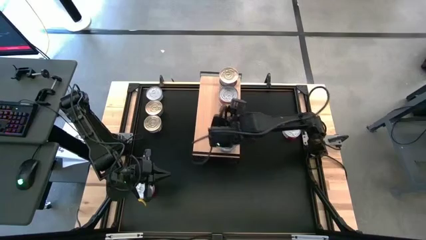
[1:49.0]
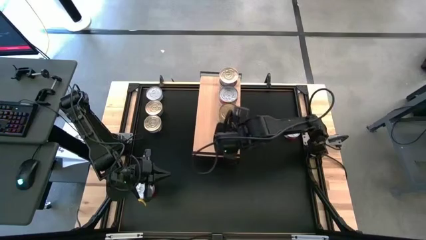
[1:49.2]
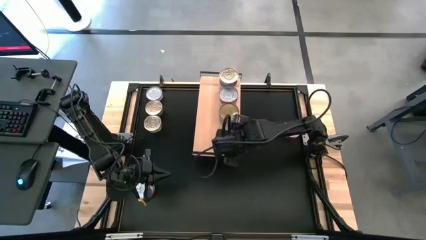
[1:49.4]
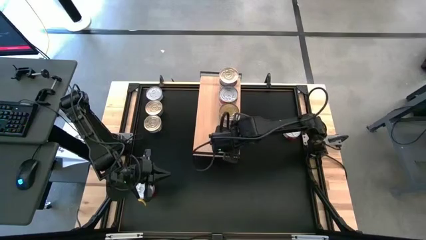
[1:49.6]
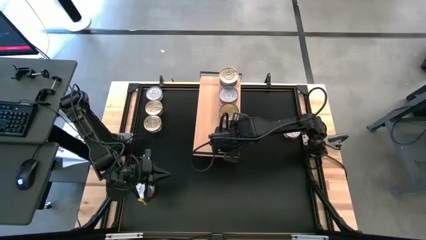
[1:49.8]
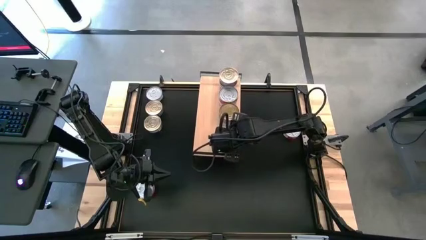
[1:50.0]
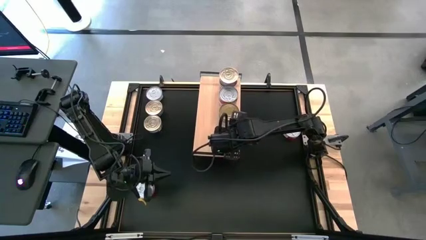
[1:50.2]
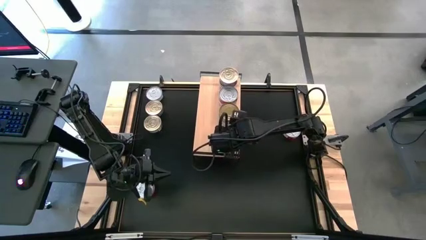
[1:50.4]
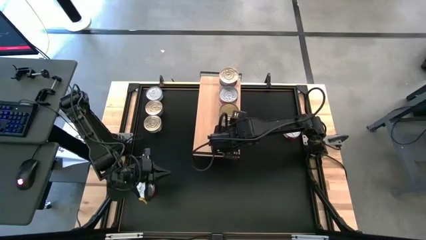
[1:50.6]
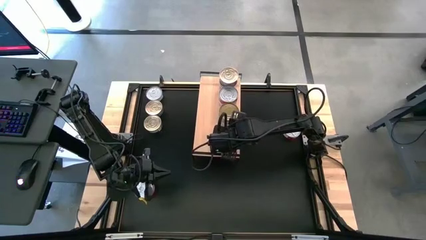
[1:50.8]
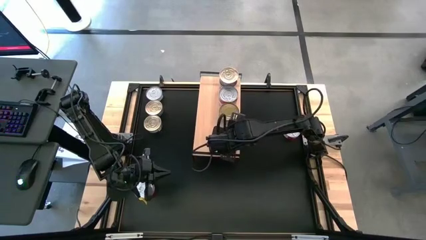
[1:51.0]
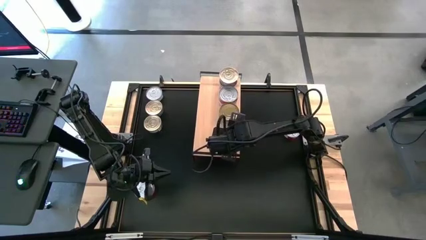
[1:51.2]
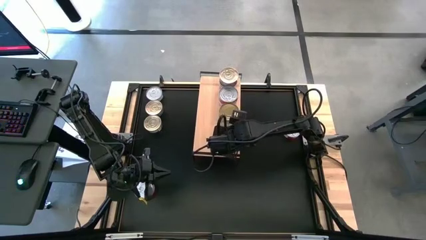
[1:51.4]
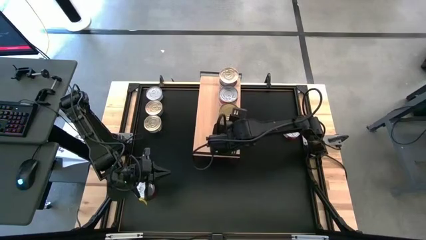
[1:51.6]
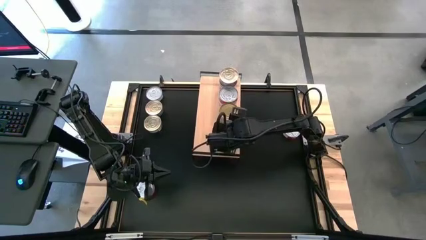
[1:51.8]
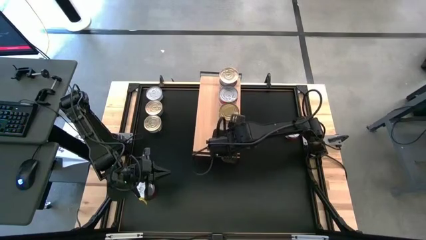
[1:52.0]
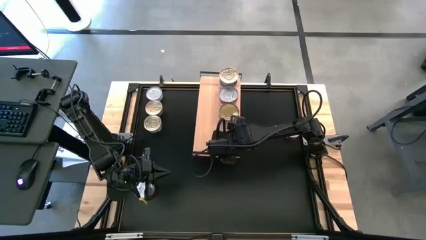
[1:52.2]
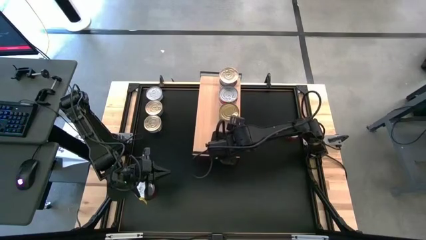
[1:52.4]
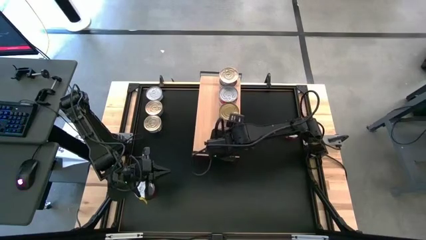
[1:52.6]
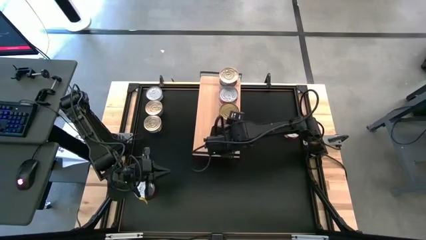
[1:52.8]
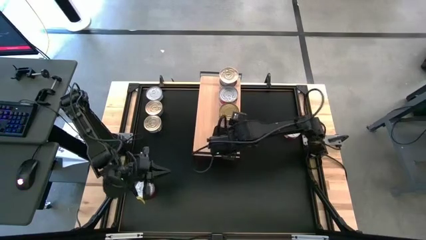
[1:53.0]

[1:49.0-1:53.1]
Task: Stack canned seafood by type on shelf
Adjust the dark green tuna can on the shelf

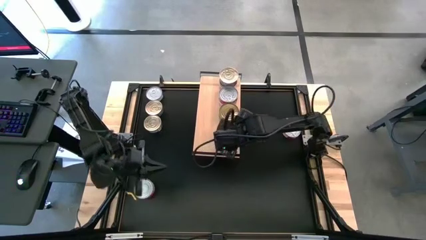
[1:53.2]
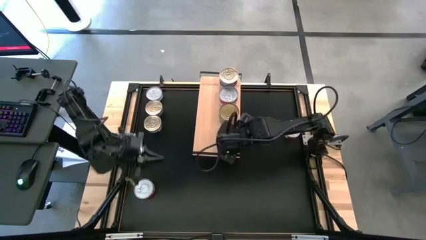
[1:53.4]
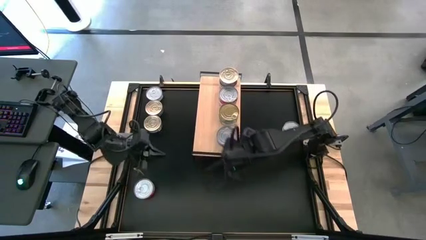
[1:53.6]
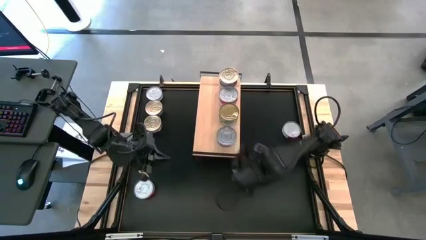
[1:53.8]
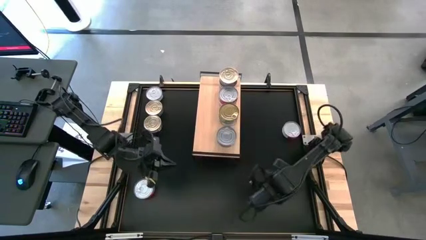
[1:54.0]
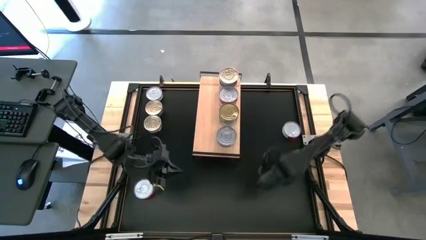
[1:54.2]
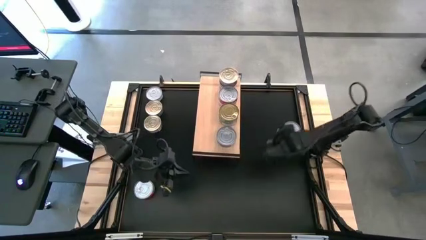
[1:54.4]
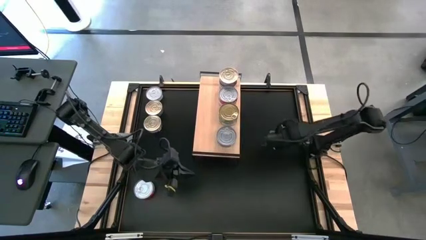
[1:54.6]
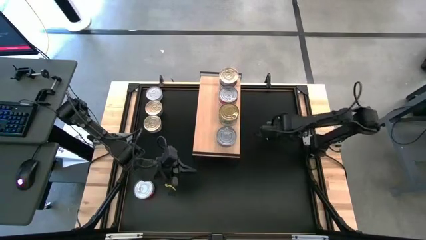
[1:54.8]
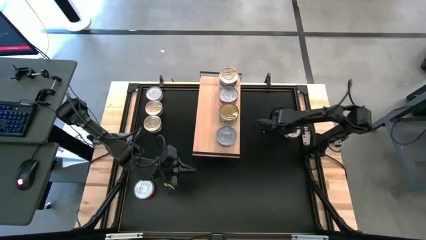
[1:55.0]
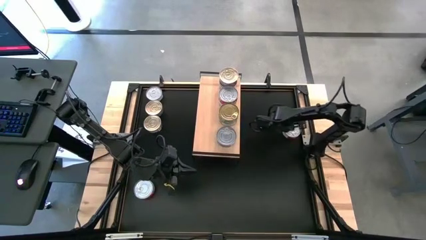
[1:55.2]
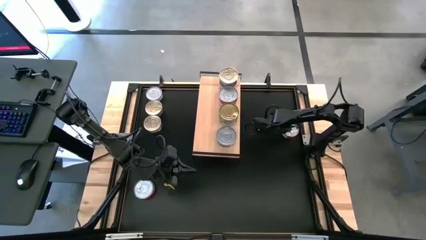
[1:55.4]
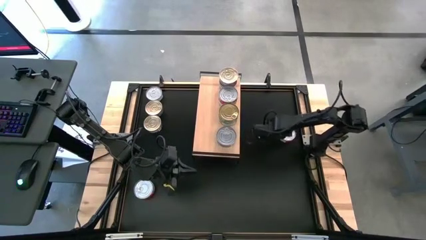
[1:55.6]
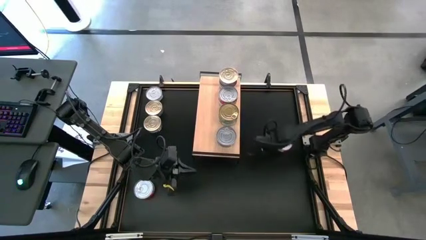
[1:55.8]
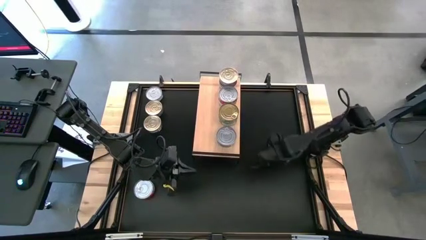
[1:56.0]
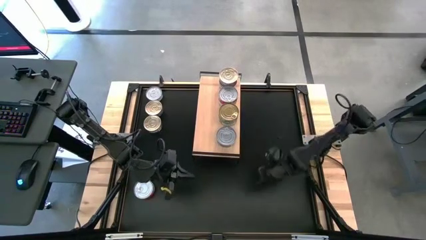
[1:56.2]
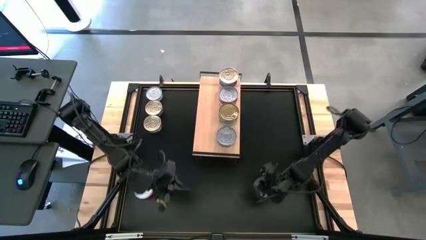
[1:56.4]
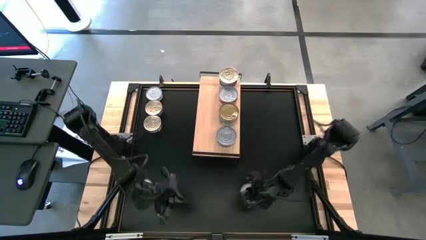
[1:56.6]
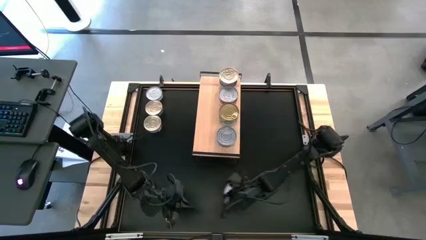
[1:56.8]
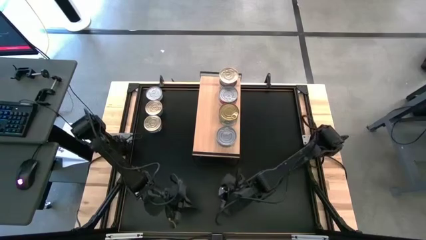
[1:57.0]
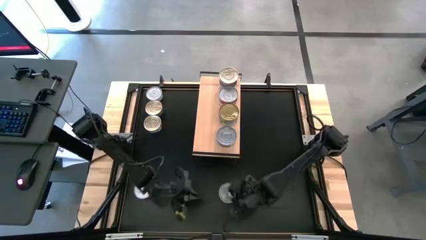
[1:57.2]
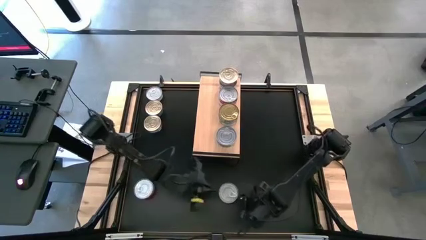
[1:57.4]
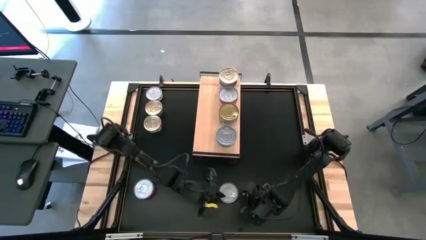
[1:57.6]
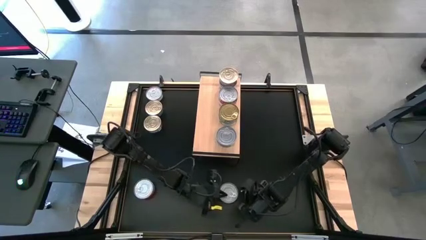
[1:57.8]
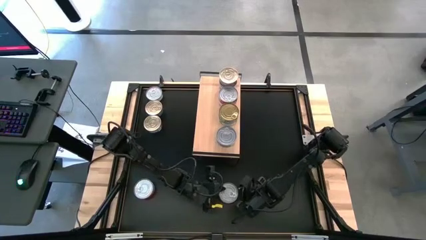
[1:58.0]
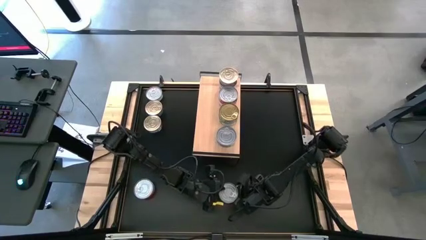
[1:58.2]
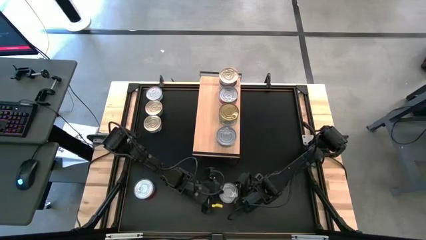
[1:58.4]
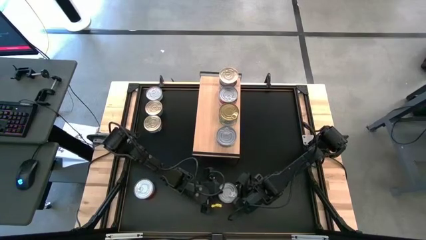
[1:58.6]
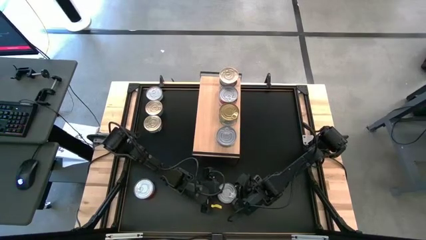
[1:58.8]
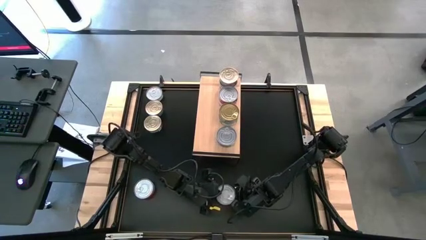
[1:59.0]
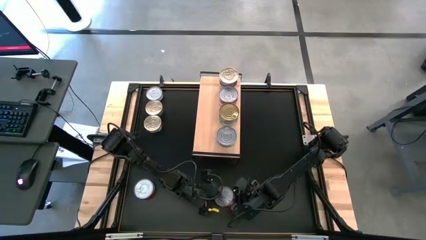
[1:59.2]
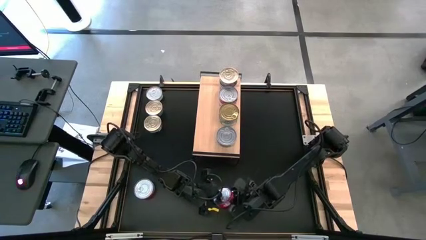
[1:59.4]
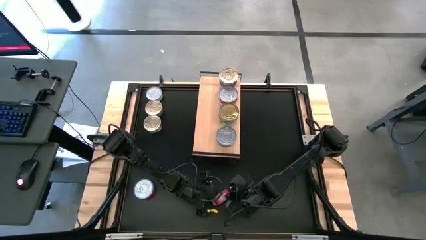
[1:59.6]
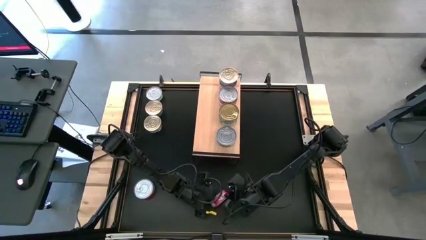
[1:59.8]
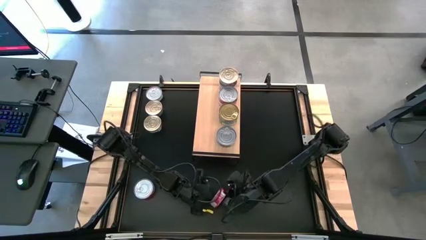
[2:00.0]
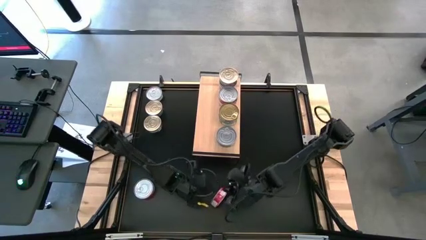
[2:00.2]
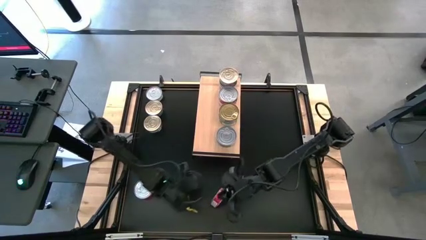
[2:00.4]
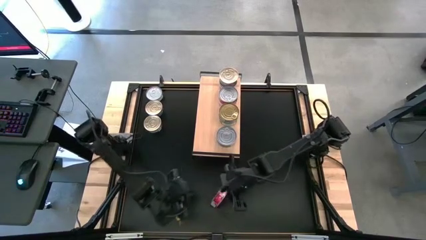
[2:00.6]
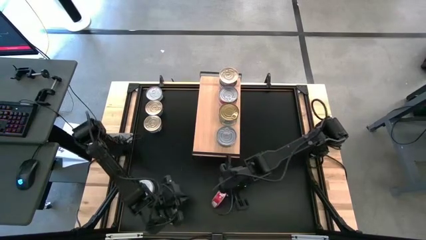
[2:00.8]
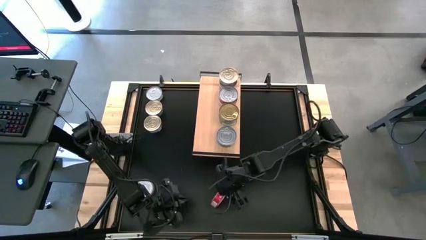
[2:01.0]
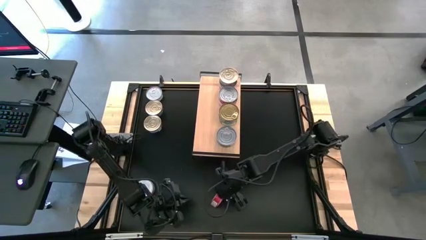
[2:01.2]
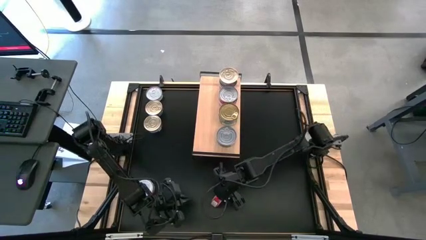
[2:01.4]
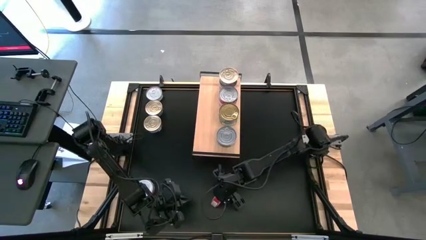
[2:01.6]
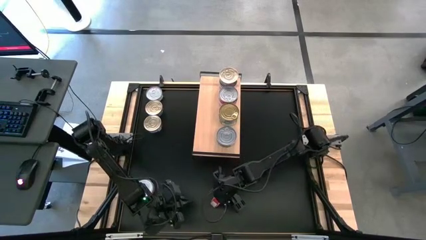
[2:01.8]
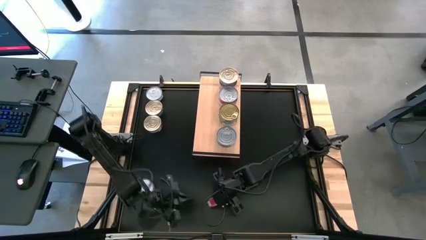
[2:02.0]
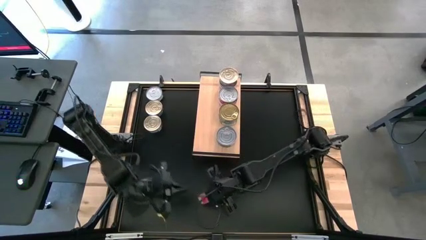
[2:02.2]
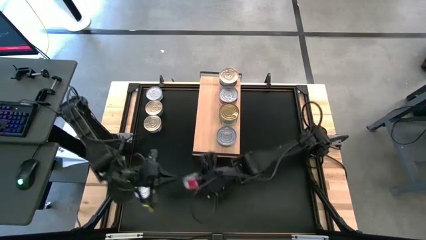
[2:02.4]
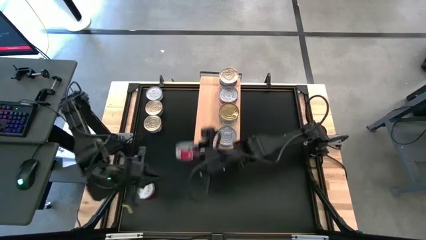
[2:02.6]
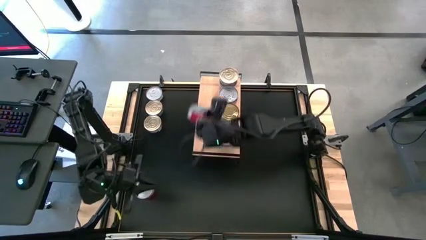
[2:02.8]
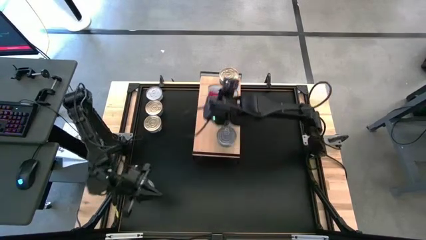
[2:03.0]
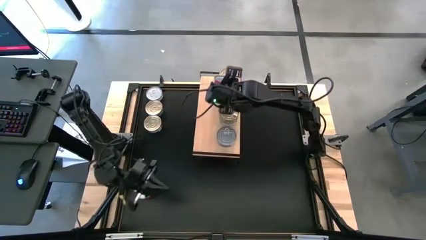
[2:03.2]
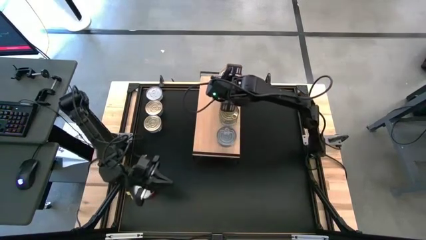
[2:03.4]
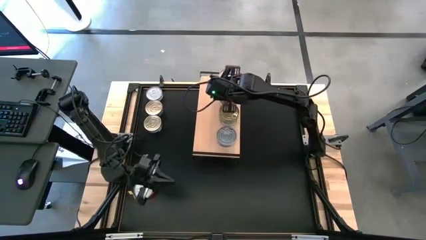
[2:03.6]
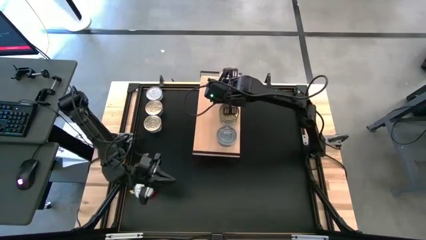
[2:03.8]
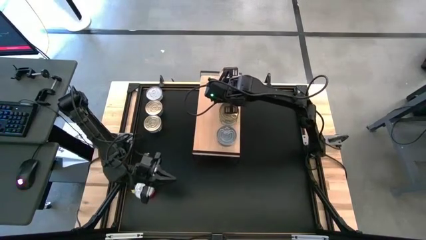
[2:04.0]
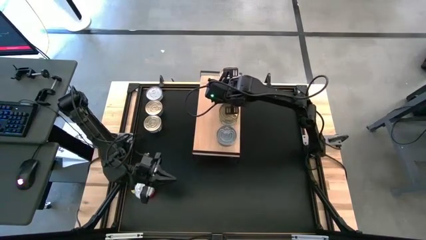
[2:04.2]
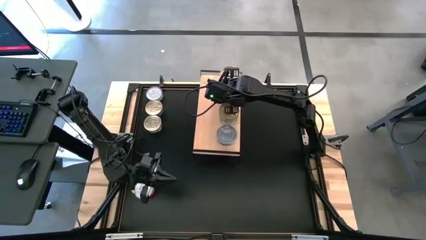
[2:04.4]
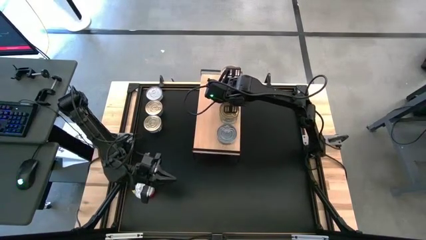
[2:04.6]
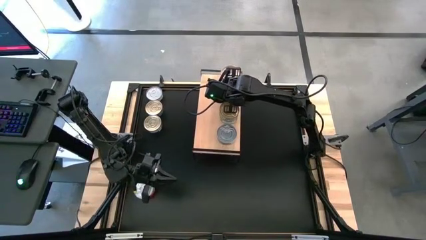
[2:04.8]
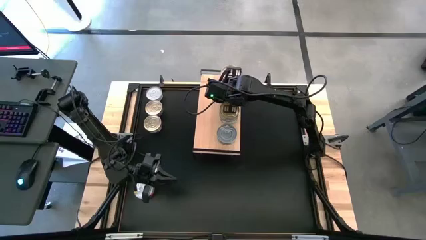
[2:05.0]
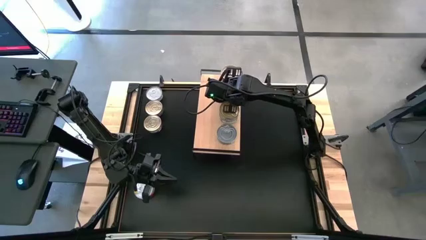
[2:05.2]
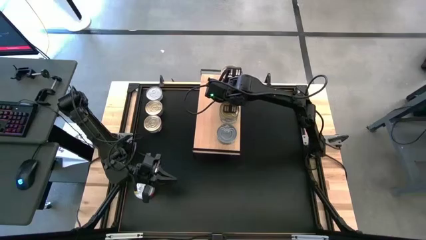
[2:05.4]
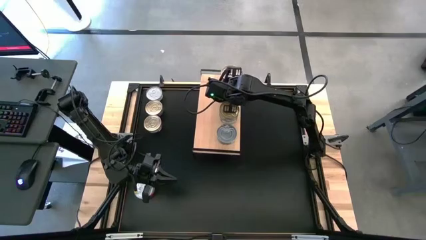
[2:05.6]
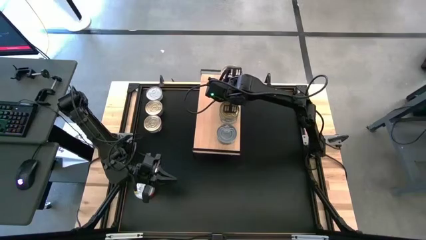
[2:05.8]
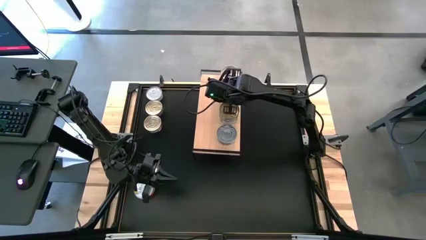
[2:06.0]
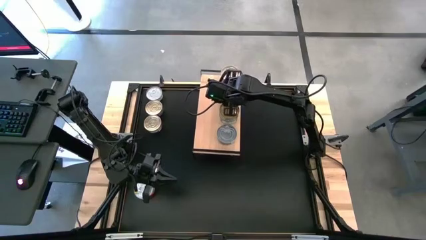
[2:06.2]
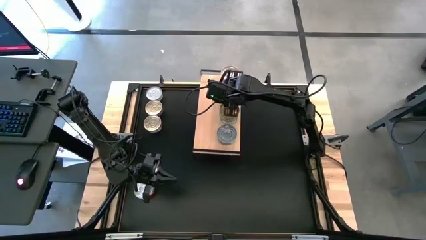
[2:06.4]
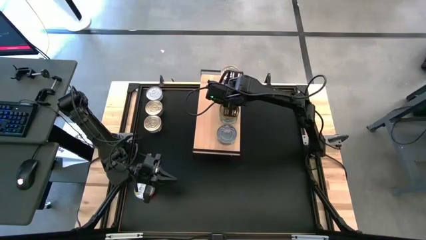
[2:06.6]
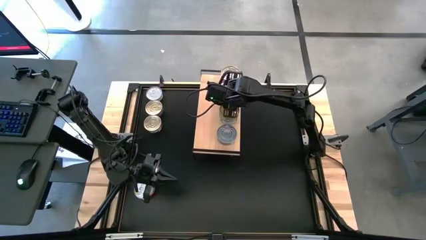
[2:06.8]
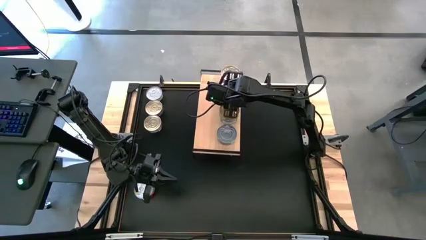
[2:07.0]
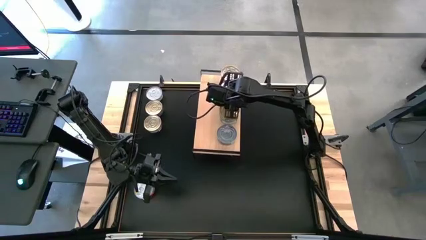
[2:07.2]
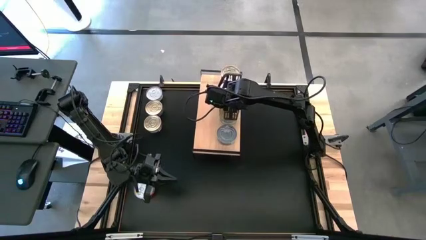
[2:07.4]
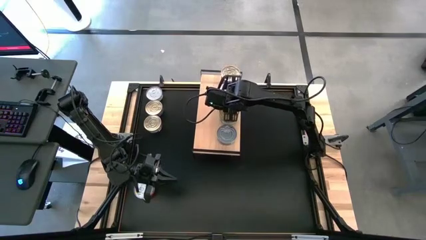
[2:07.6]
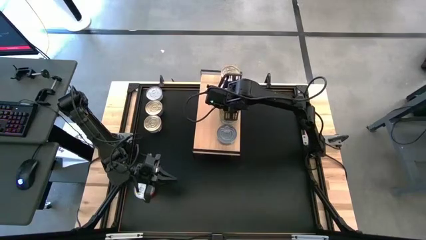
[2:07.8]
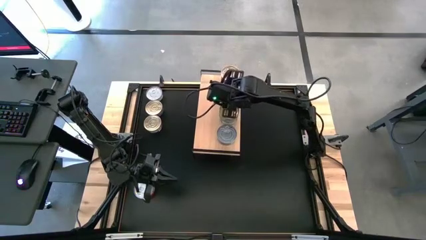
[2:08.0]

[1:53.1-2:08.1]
Stack the red tuna can on top of the red tuna can on the shelf
